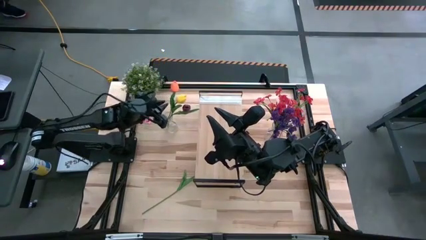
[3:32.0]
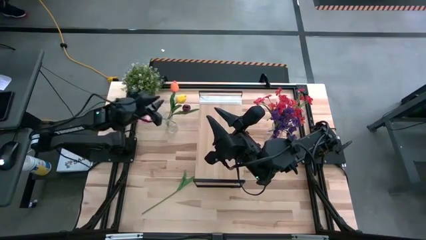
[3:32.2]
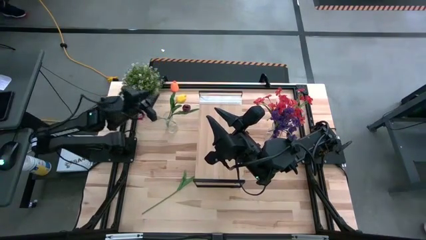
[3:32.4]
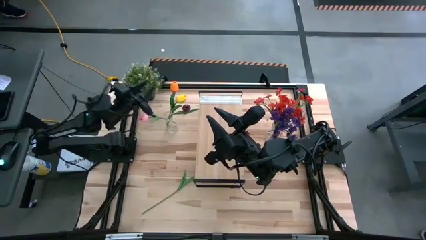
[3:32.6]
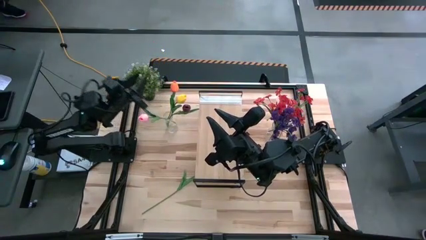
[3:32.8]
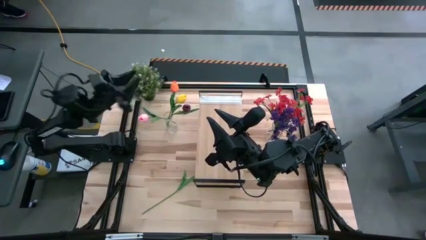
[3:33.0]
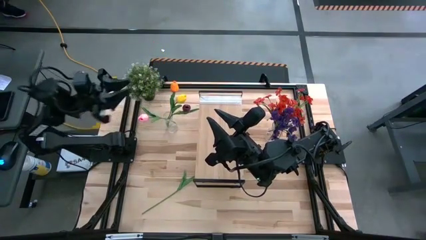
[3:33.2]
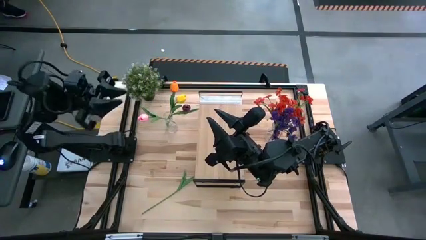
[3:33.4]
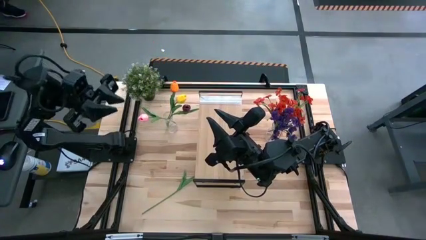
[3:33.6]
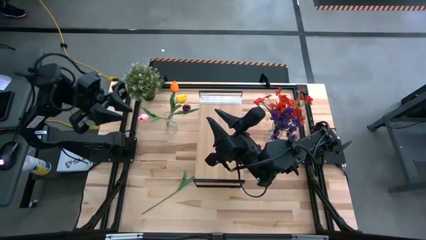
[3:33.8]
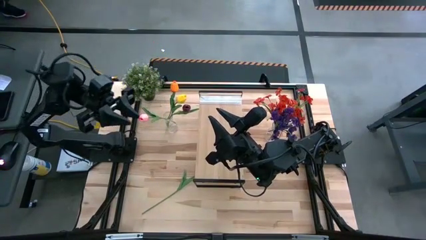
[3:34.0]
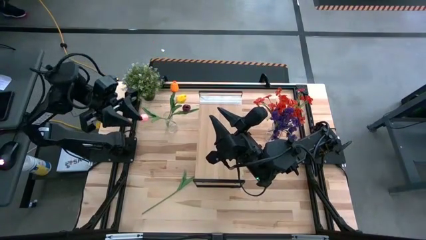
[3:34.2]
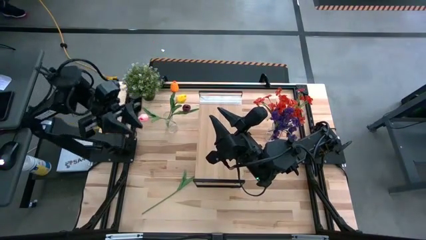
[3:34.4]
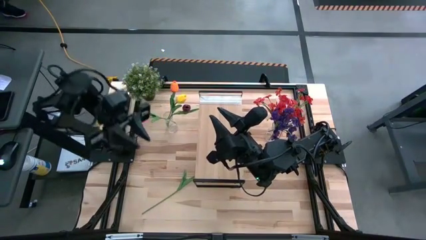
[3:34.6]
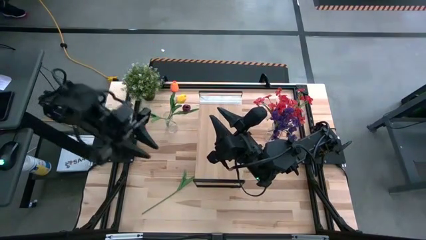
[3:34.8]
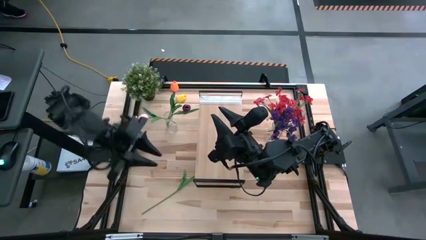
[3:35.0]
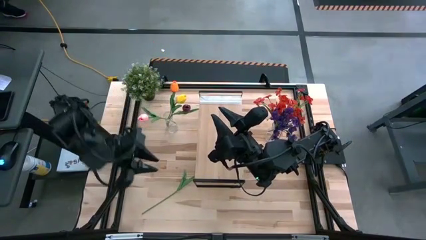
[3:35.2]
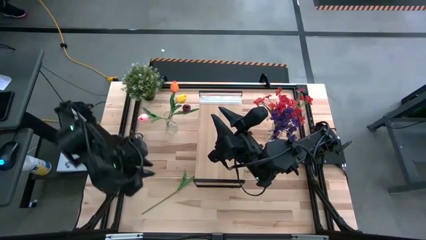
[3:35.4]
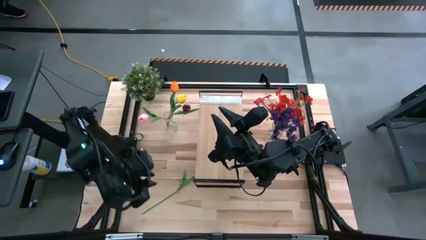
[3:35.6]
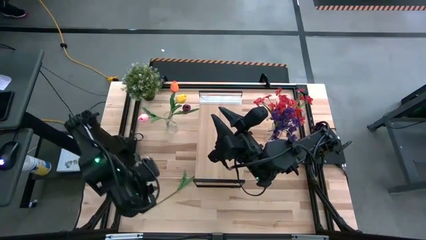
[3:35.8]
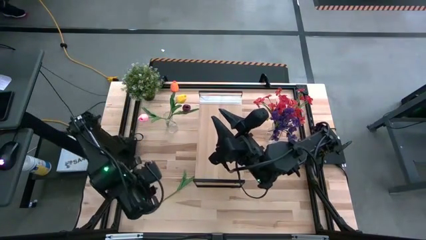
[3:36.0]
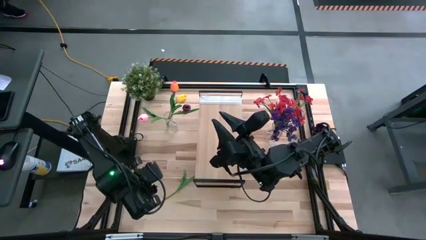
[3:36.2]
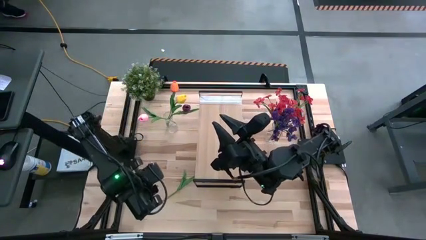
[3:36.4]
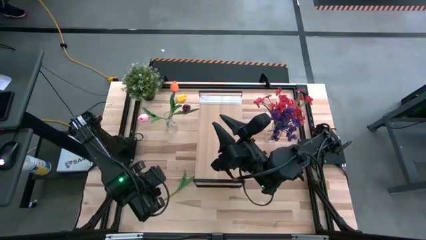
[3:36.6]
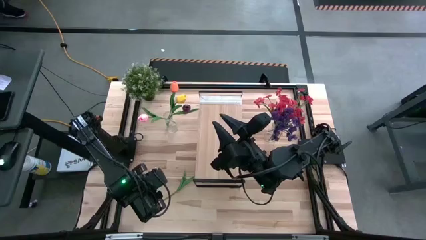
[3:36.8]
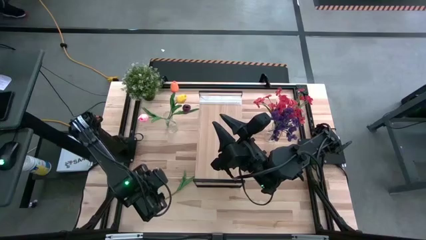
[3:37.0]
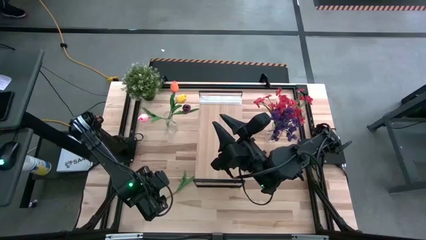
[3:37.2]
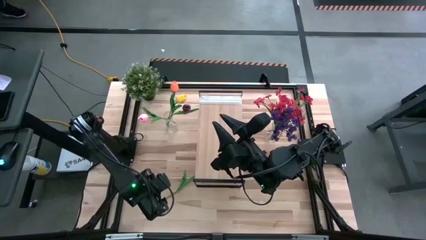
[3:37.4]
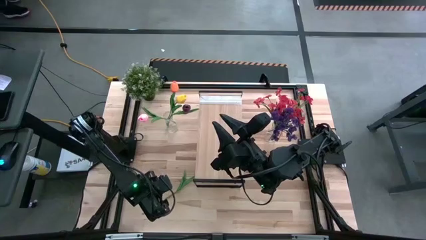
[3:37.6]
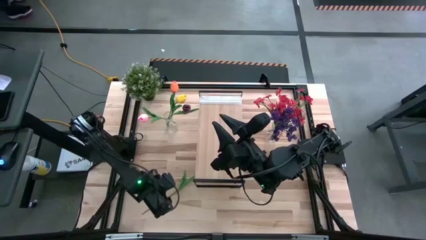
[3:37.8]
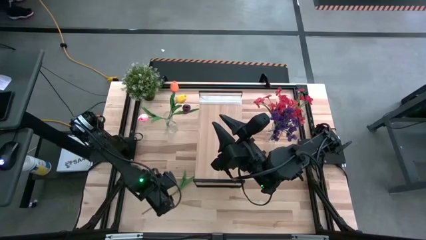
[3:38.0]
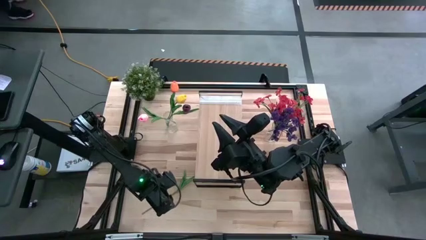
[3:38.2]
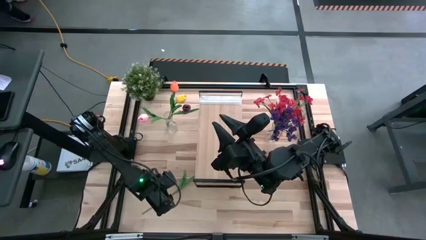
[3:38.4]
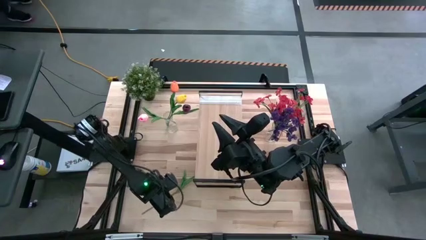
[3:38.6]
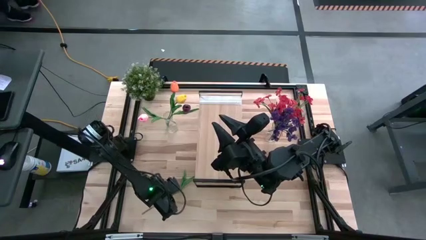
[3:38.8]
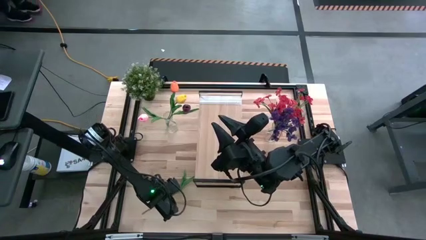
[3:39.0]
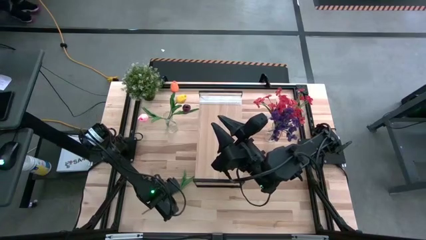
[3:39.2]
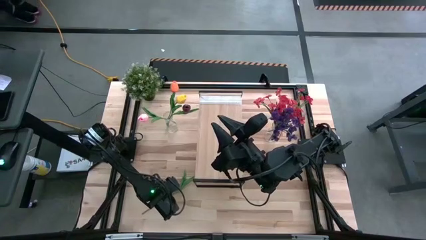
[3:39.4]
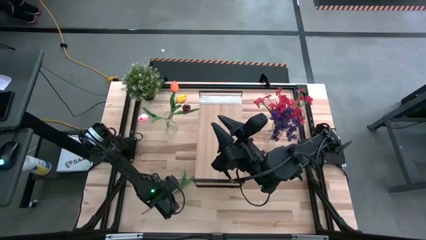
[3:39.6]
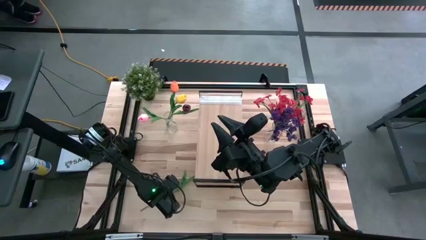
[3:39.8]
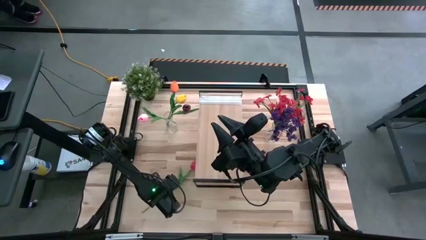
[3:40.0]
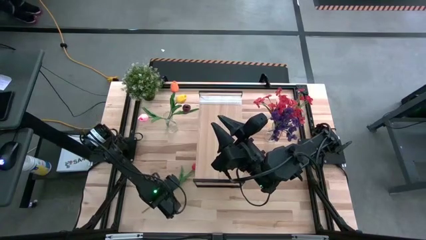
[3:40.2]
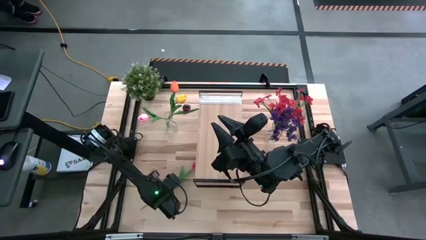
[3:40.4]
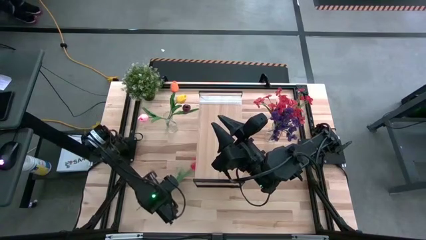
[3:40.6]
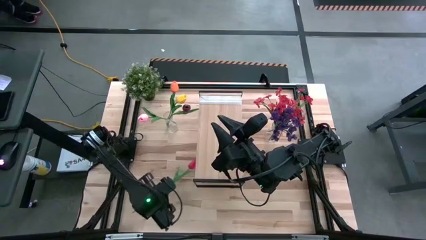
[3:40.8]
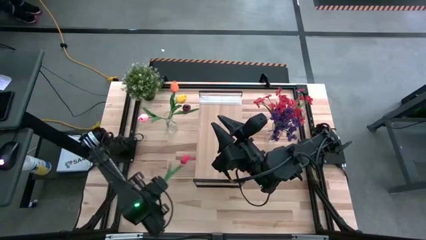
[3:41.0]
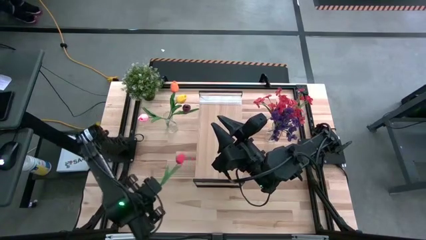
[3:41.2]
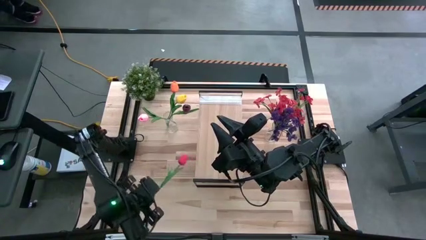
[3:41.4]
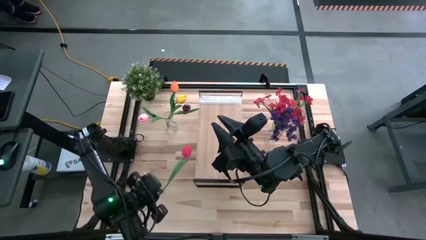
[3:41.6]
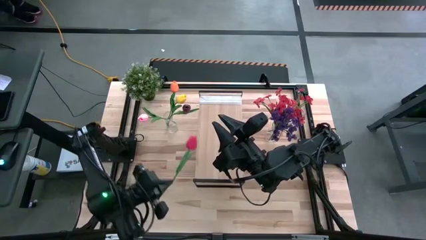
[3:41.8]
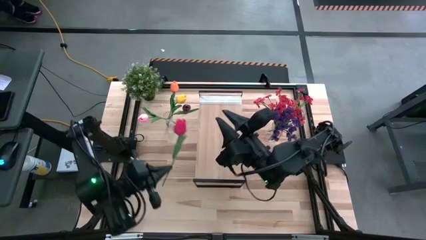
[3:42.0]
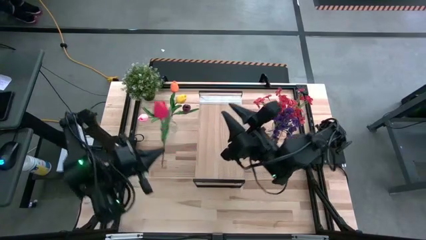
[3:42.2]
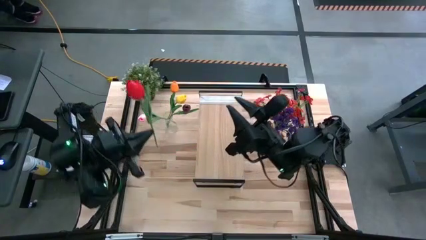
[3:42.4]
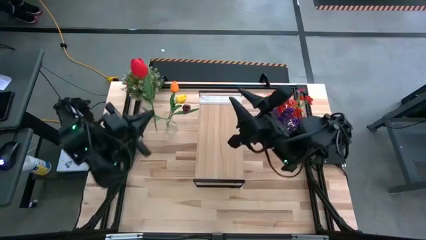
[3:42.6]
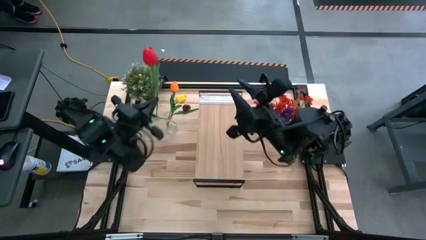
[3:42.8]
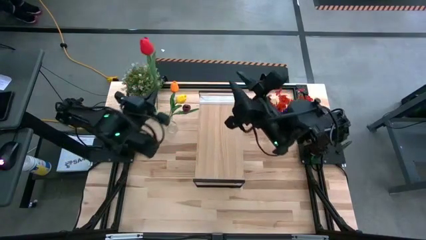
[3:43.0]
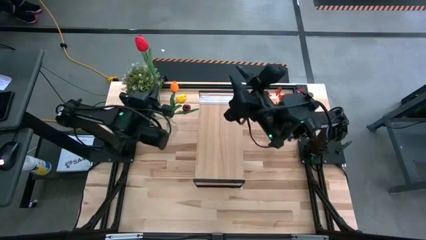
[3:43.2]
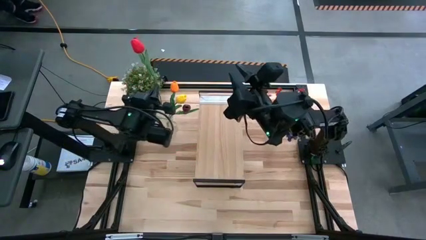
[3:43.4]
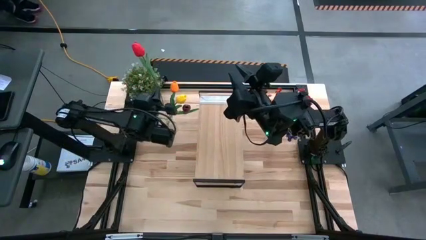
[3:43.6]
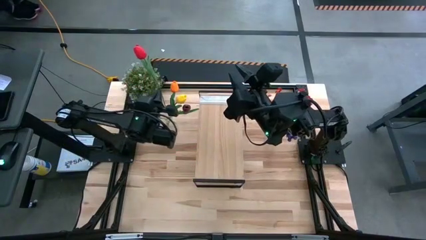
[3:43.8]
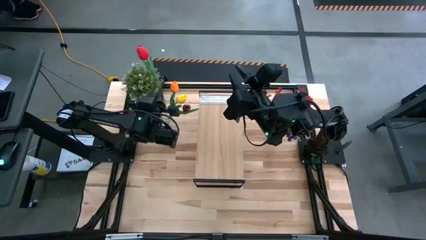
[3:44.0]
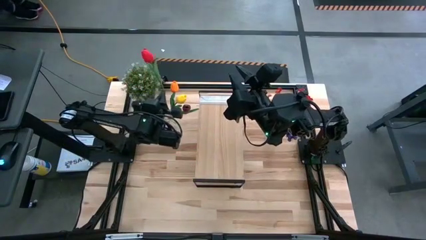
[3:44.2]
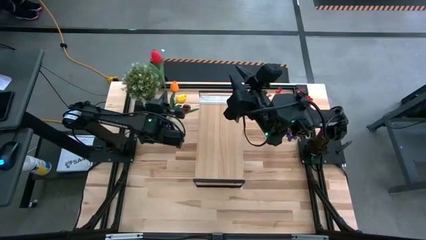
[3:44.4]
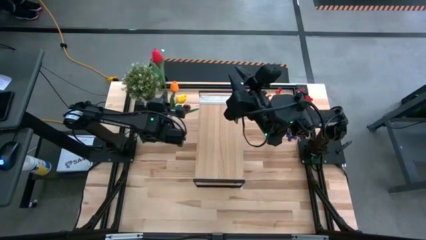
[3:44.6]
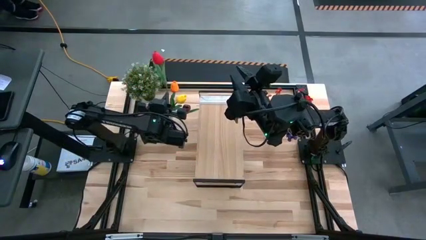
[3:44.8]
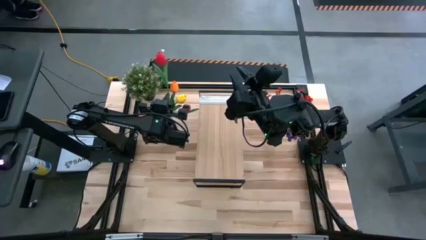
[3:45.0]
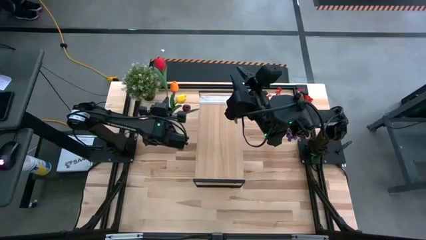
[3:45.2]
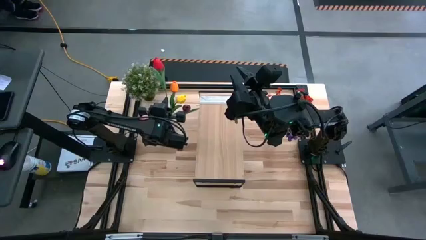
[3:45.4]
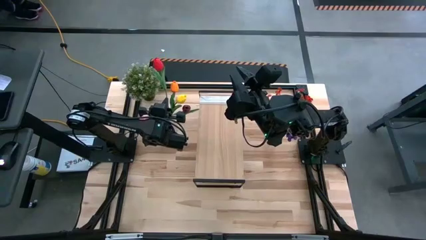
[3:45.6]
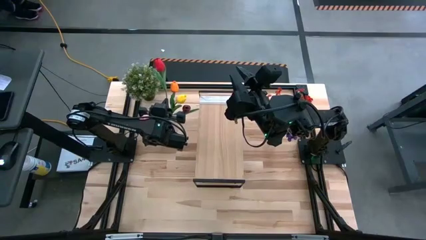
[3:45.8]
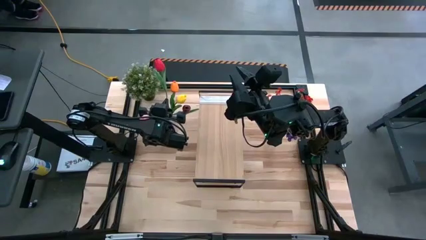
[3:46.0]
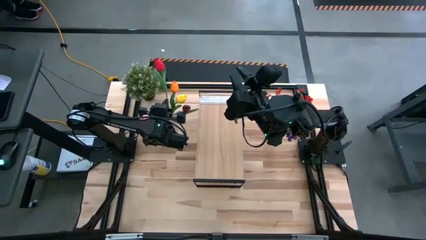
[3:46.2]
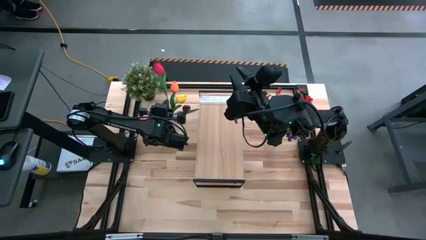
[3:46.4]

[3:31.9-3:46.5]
Task: Pick and place flowers into a vace then onto a shelf
Put the red tulip into the left transparent vase

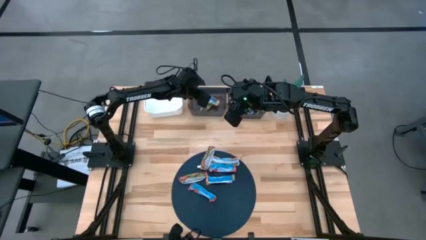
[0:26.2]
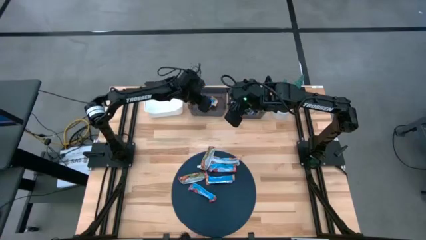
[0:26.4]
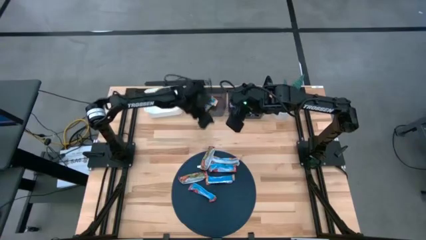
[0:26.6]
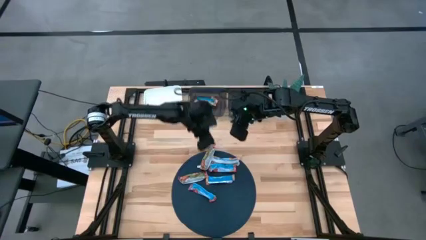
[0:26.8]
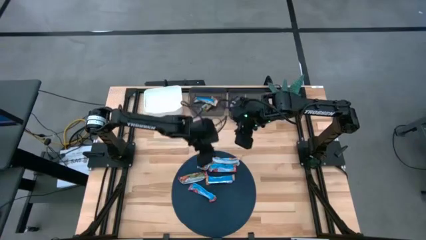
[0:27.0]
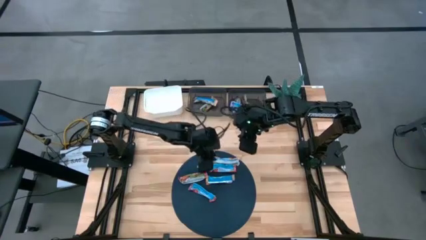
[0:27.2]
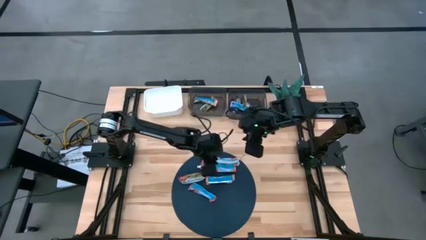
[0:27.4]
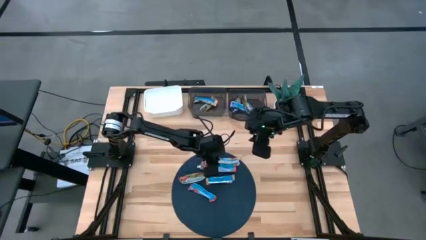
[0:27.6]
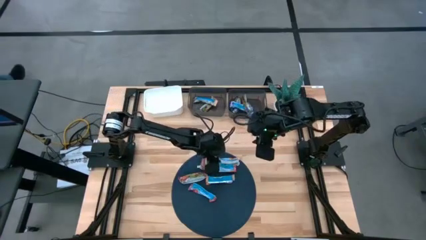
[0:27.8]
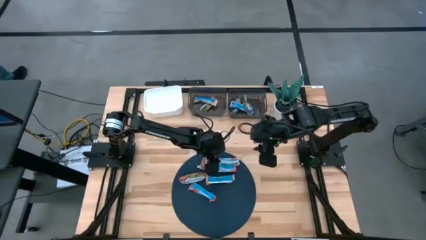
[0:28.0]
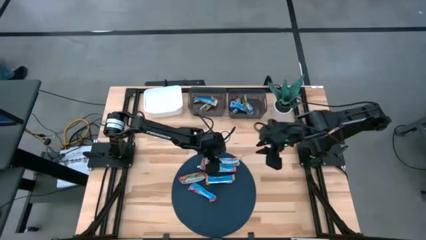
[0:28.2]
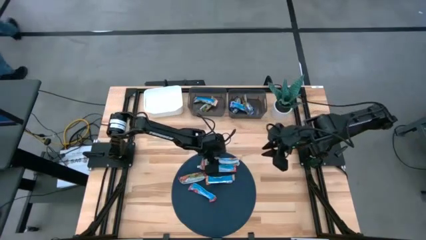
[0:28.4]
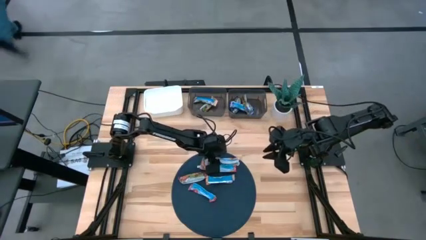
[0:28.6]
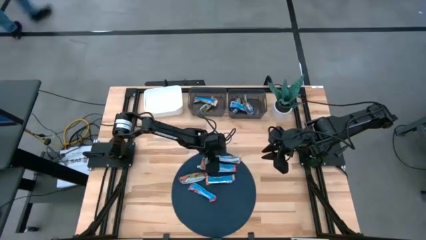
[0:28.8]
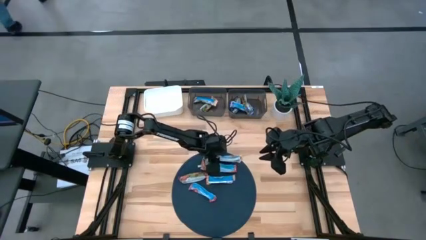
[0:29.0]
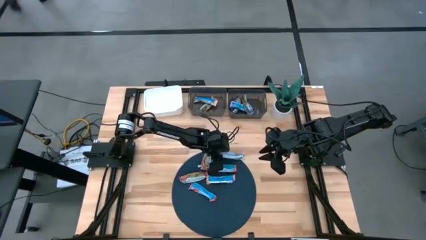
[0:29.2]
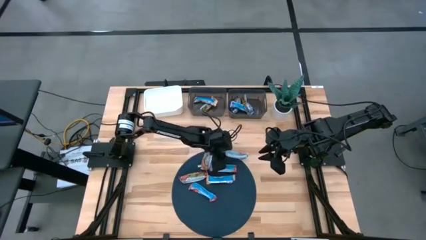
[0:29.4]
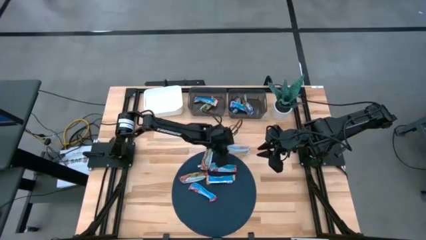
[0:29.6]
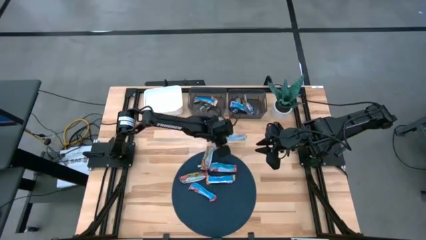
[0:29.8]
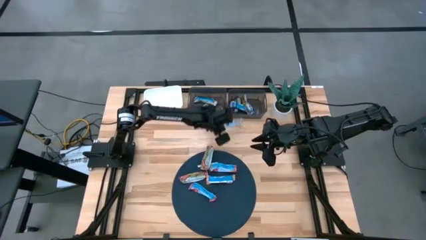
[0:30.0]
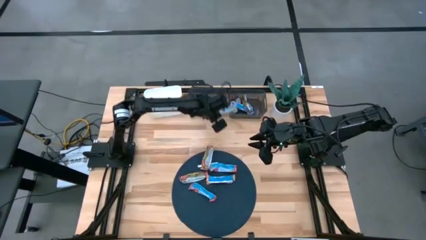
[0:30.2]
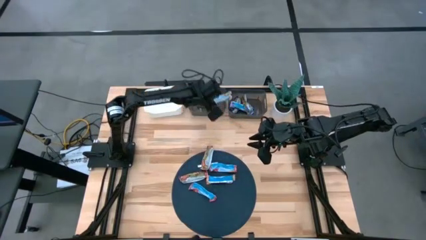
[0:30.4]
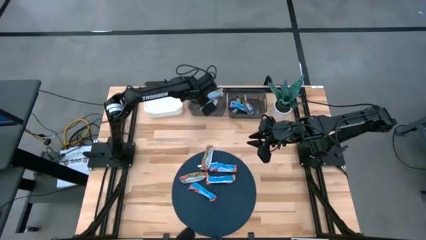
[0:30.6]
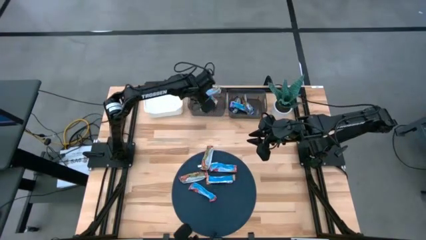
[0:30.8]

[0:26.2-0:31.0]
Task: Pick and place Granola Bars by type
Put the orange granola bar into the left black transparent bin
